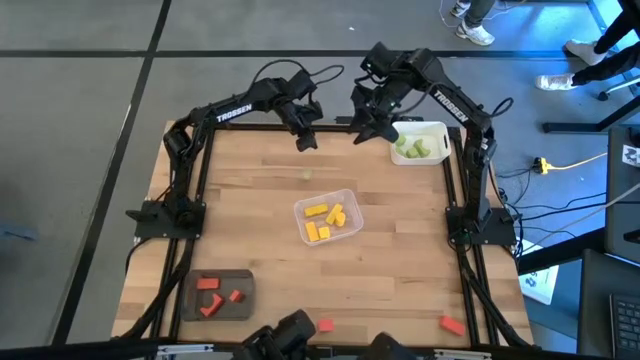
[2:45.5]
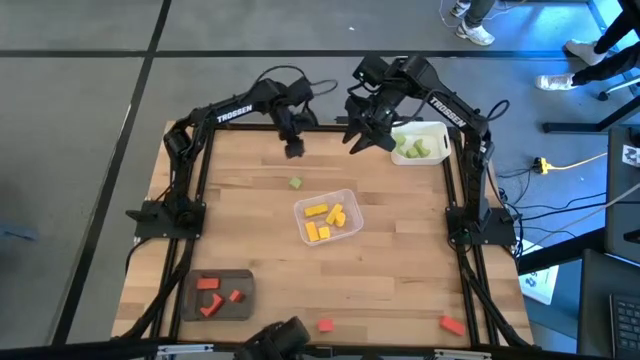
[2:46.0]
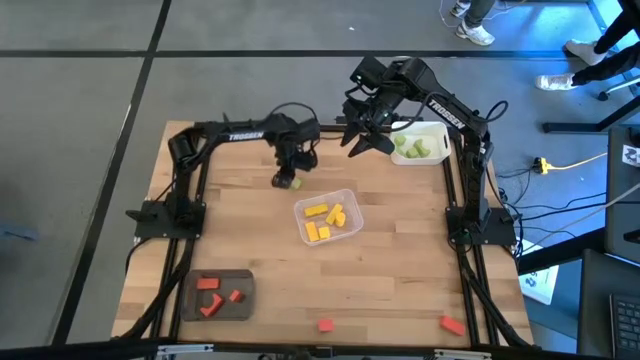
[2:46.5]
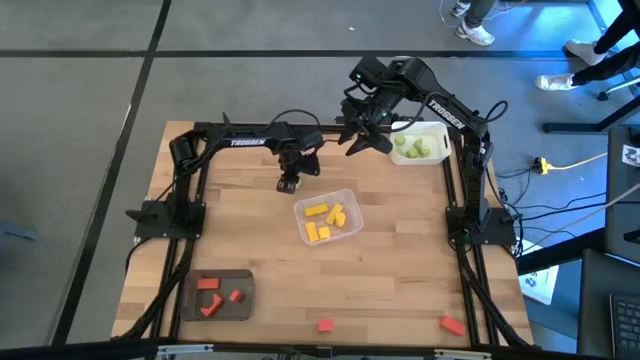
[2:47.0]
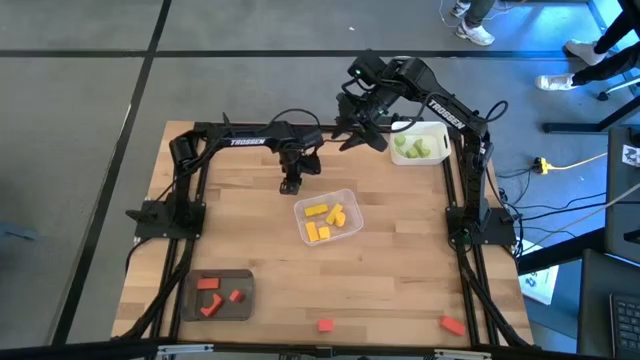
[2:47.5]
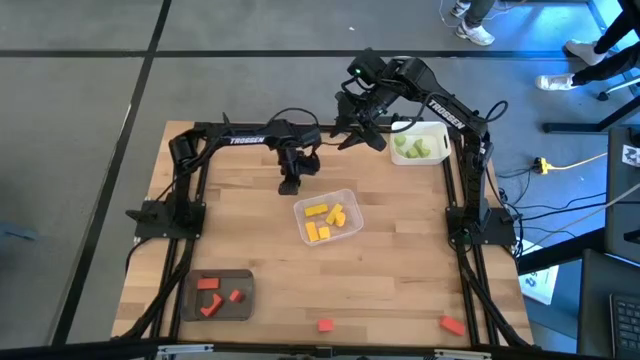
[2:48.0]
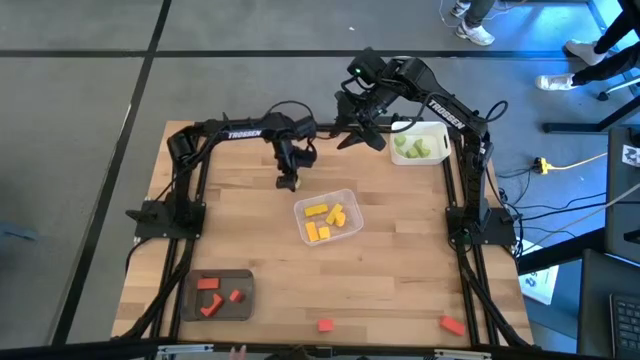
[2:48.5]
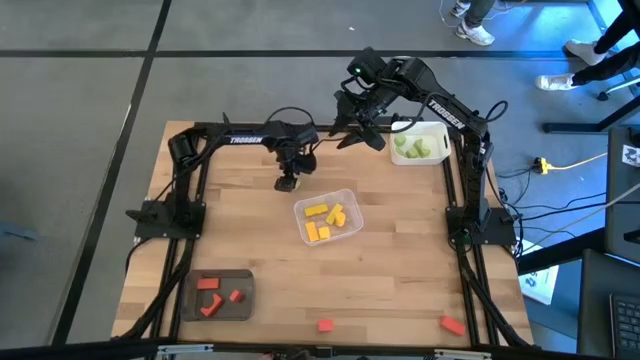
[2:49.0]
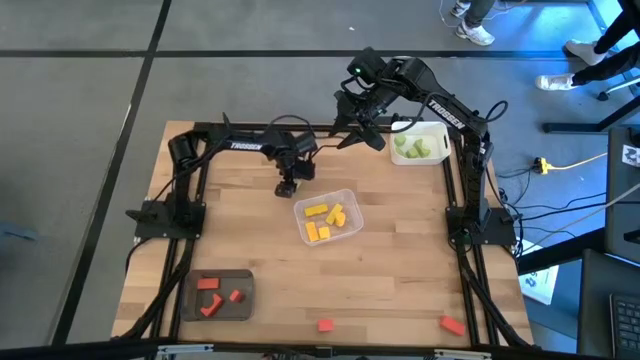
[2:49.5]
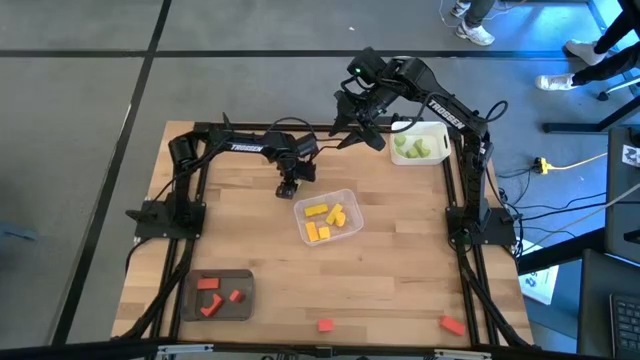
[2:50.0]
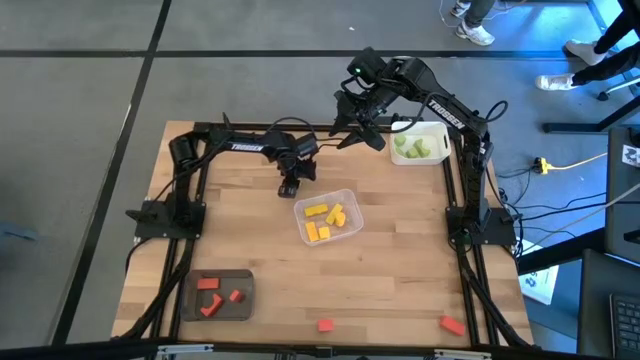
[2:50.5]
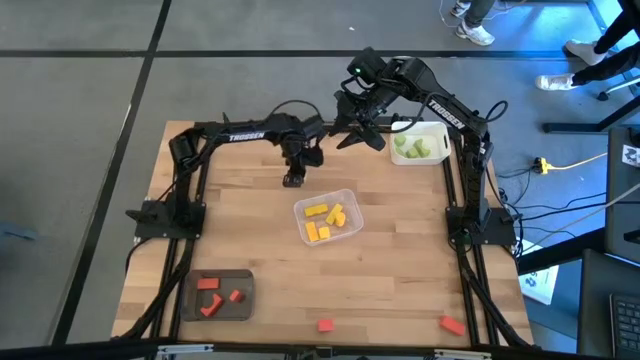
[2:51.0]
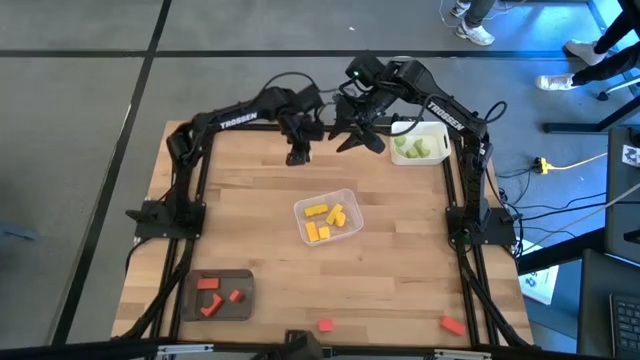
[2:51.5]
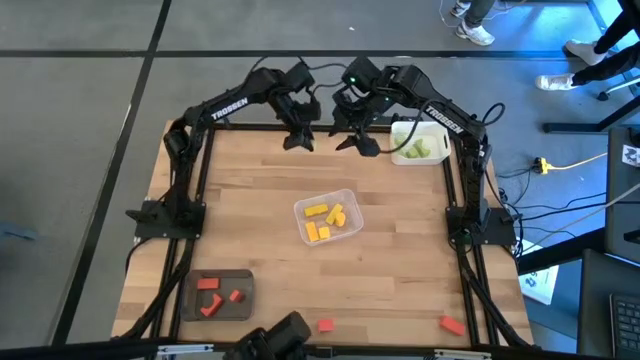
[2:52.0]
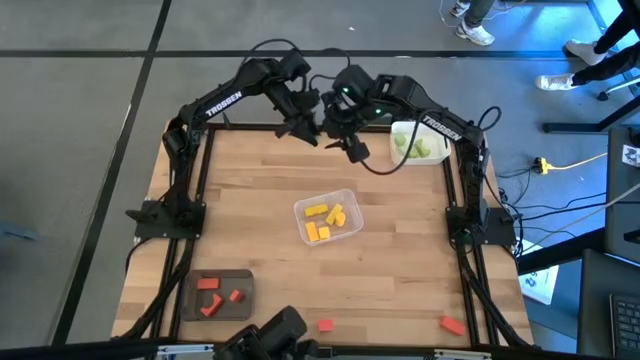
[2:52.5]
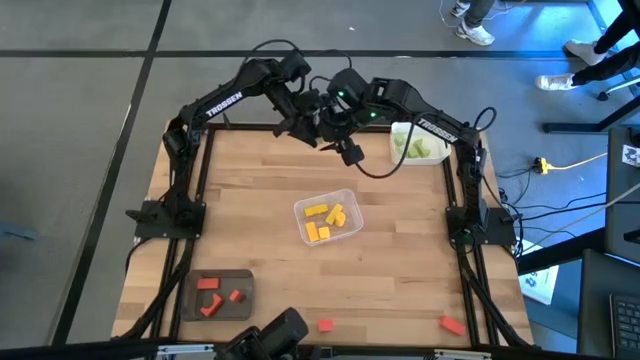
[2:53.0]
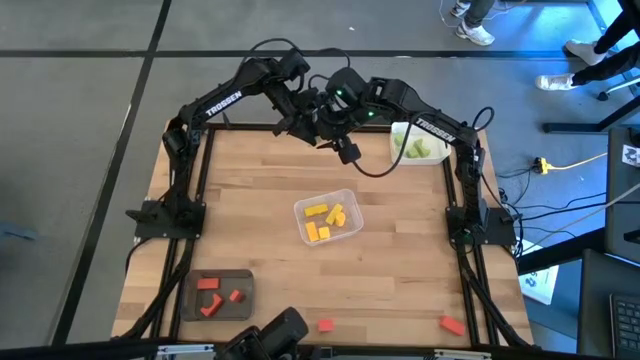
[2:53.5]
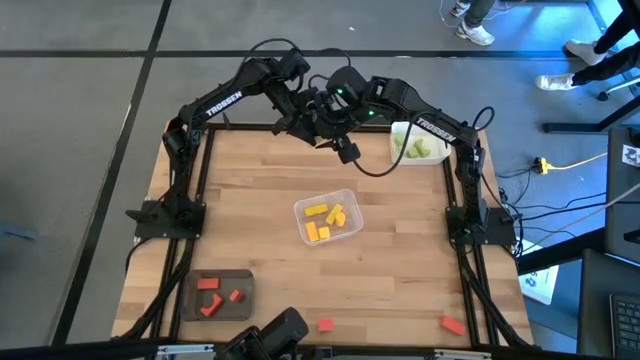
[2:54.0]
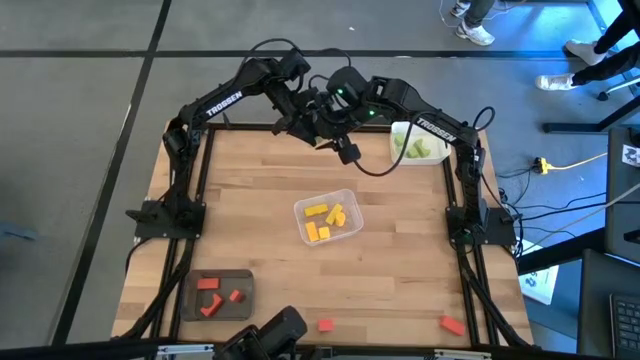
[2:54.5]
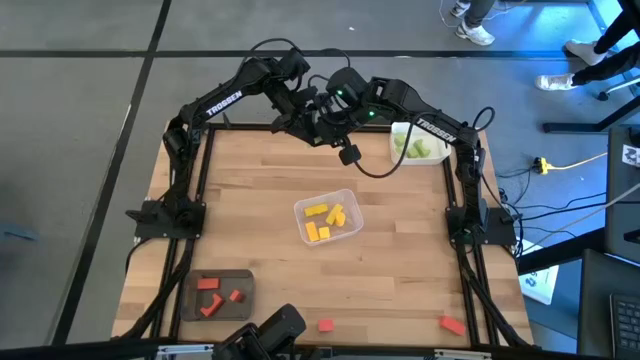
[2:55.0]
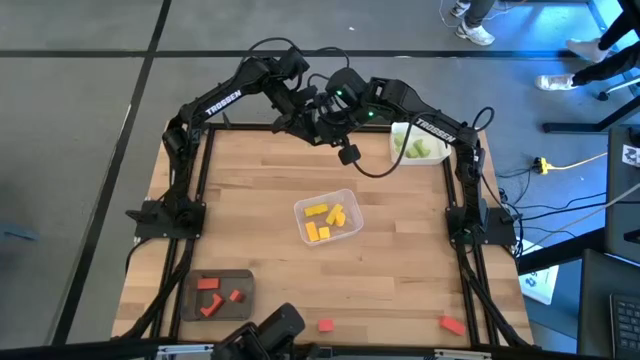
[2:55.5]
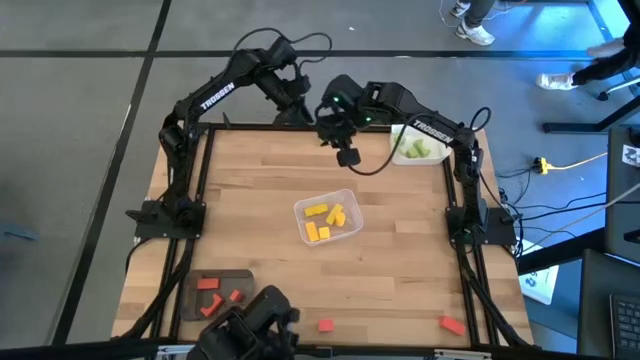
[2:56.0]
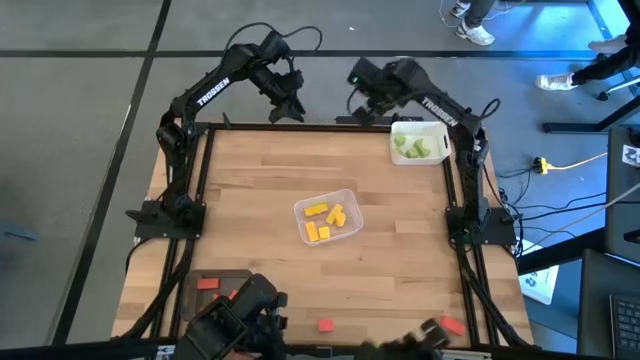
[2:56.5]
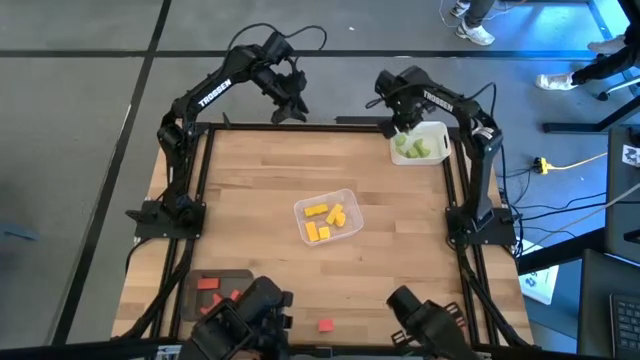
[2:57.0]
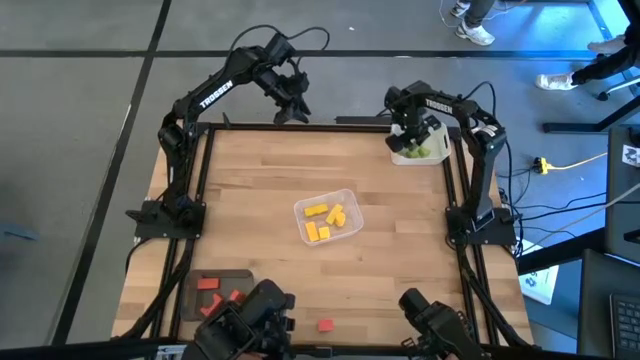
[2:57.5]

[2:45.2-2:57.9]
Task: Sort & place blocks by color
Put the green block into the white bin

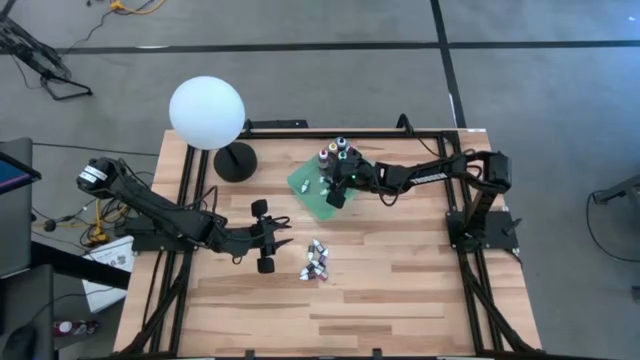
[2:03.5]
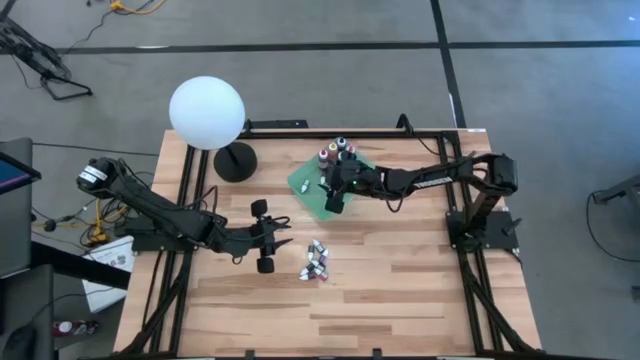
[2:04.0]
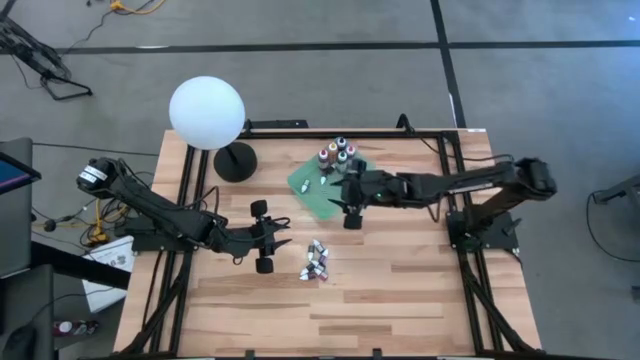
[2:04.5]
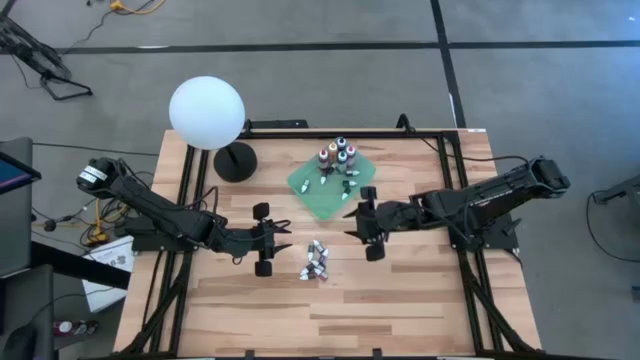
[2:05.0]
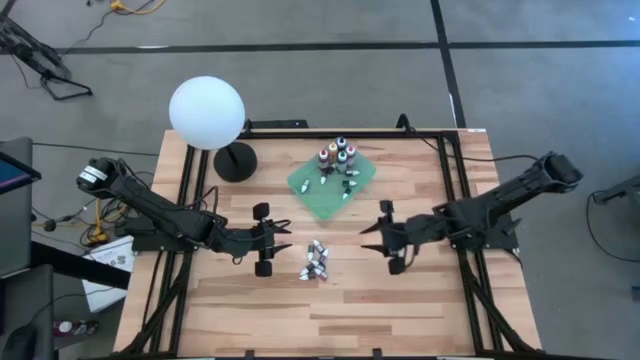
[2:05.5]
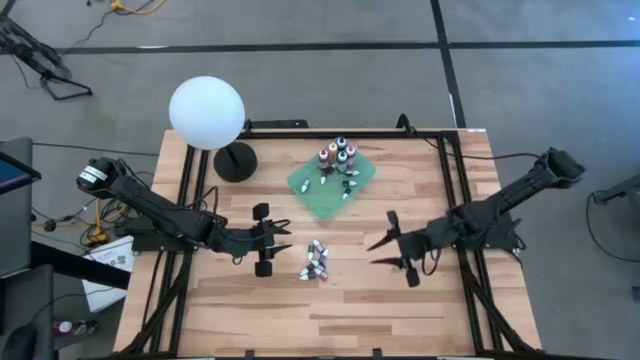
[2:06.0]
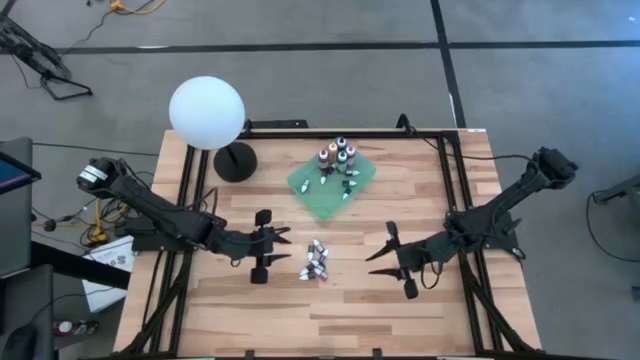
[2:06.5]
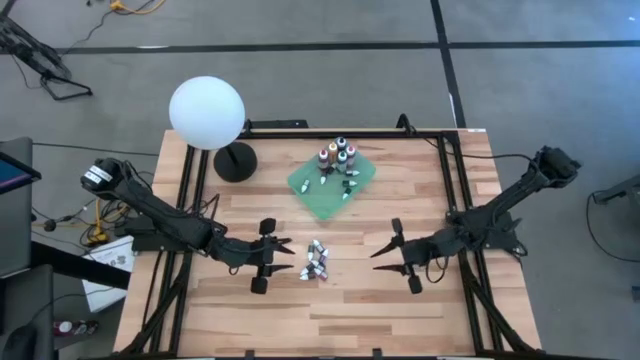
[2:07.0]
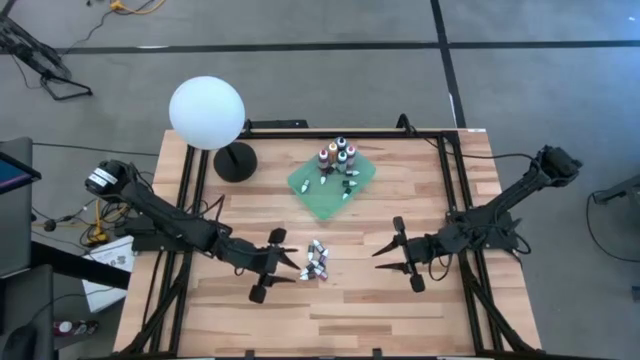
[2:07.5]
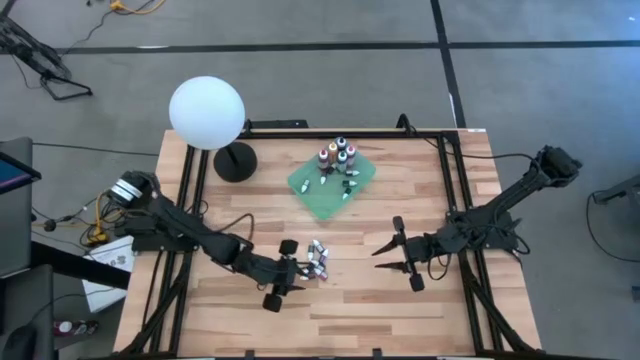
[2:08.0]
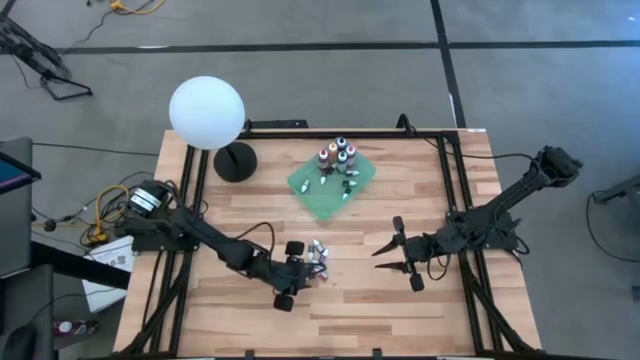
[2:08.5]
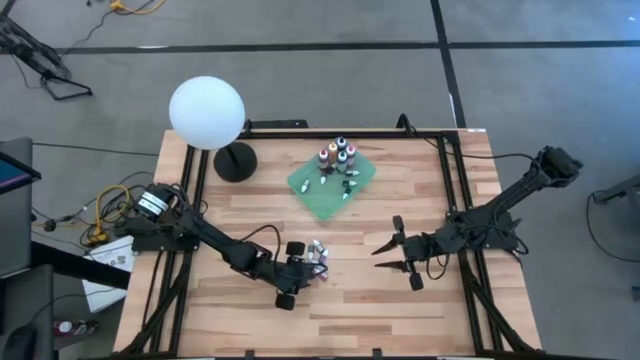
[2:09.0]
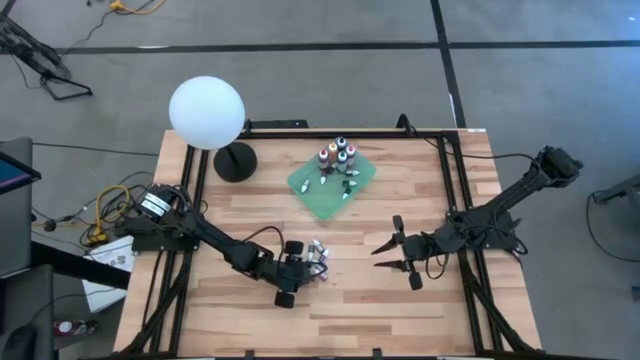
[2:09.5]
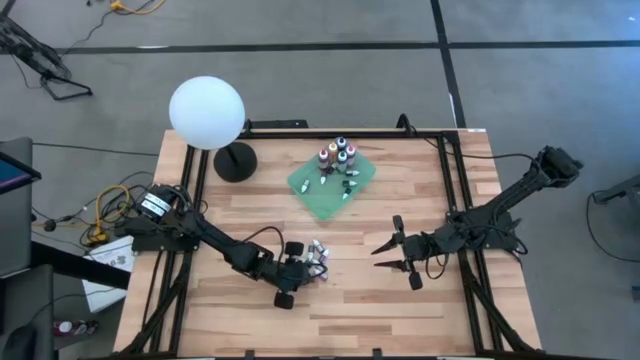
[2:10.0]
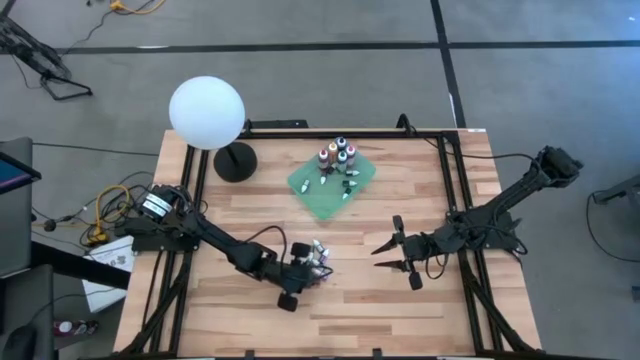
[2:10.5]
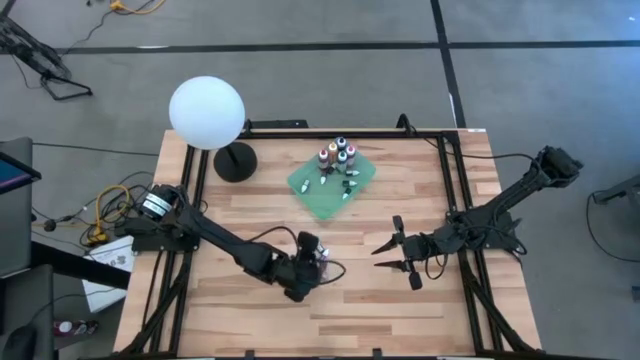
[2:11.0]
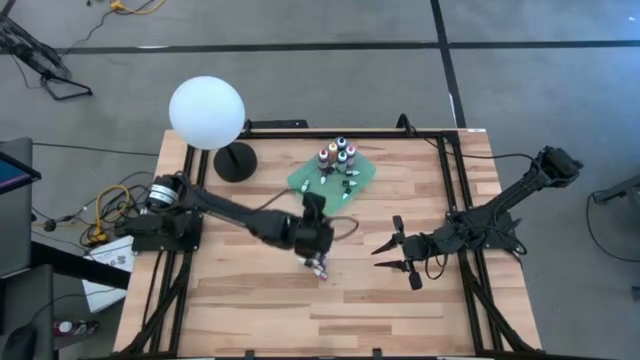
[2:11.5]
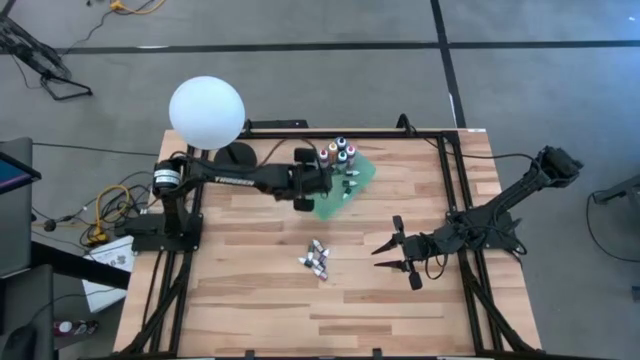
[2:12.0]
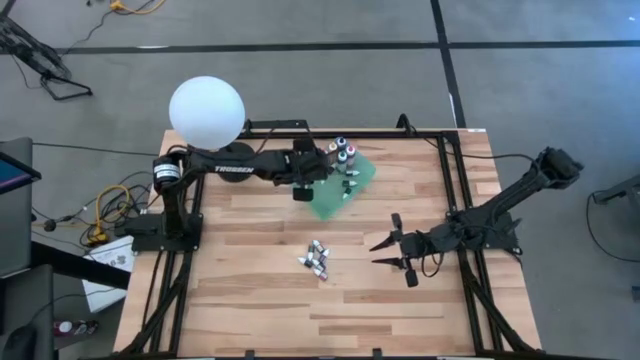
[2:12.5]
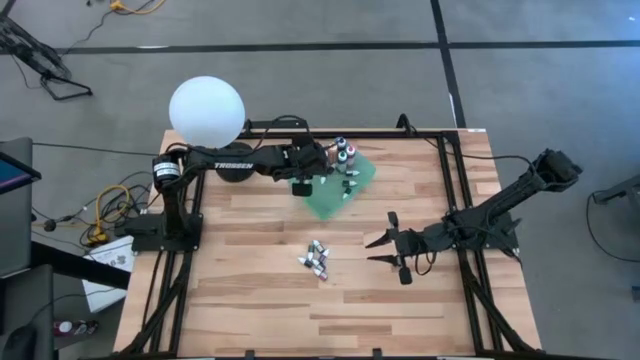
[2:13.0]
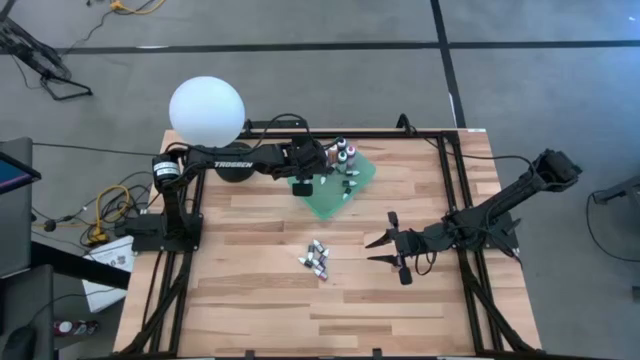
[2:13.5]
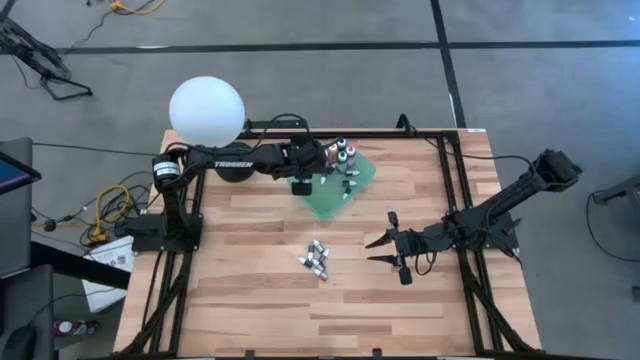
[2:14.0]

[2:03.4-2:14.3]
Task: Pick & Place food coloring
Put the red food coloring bottle into the green bin
